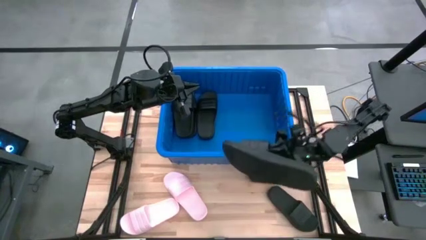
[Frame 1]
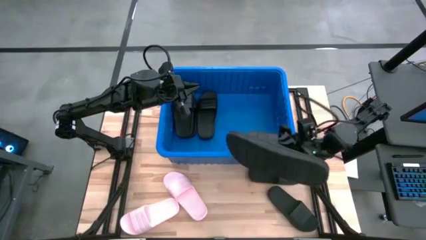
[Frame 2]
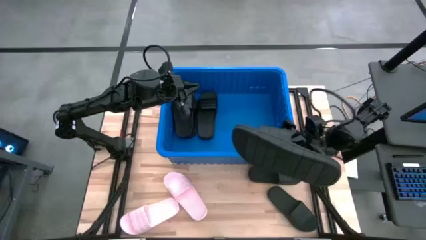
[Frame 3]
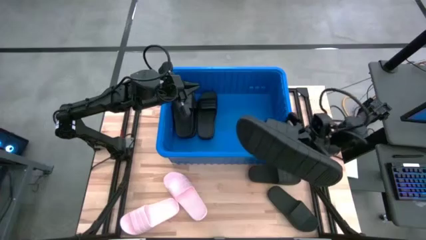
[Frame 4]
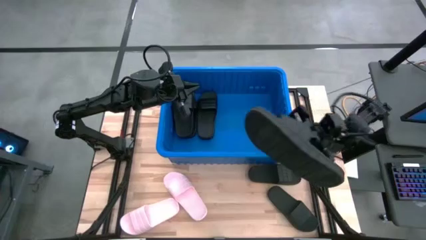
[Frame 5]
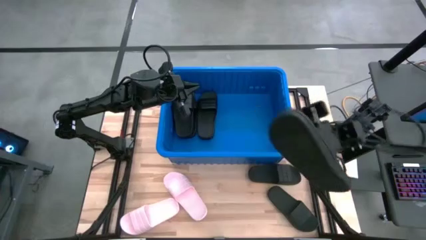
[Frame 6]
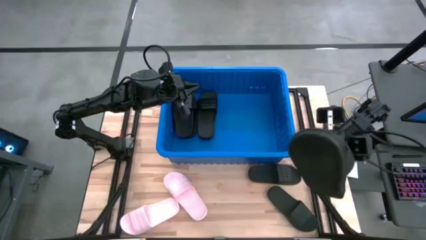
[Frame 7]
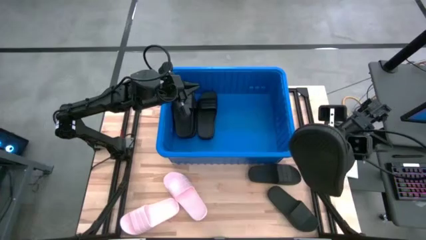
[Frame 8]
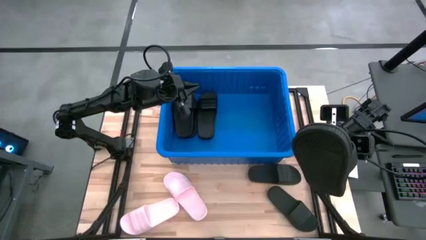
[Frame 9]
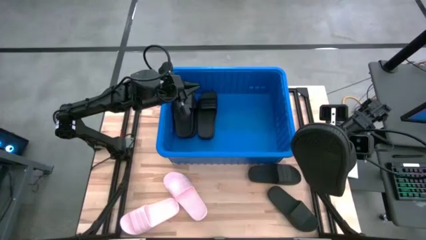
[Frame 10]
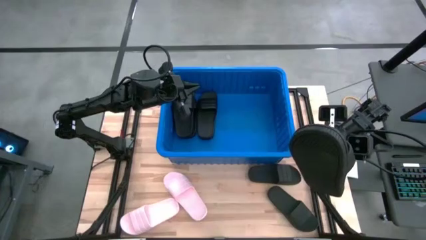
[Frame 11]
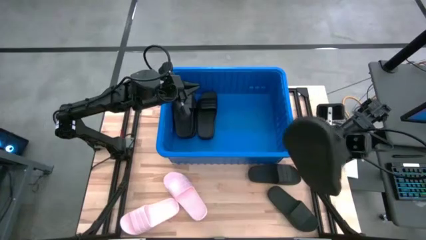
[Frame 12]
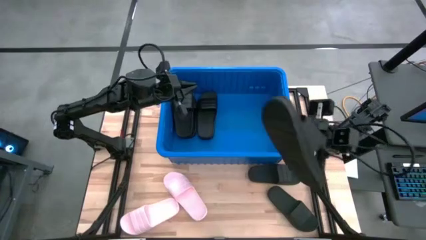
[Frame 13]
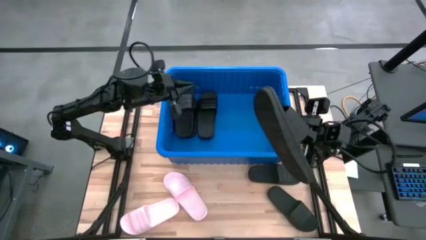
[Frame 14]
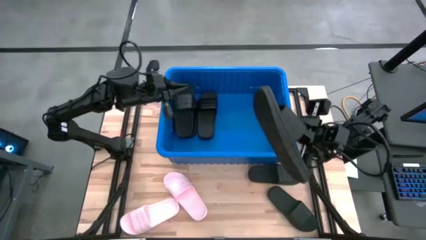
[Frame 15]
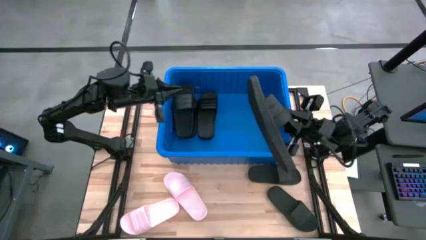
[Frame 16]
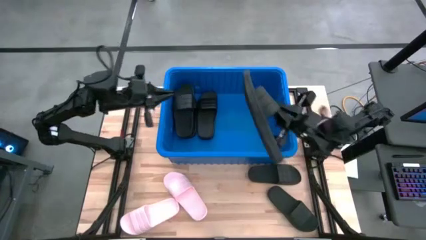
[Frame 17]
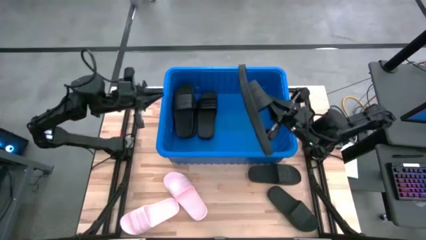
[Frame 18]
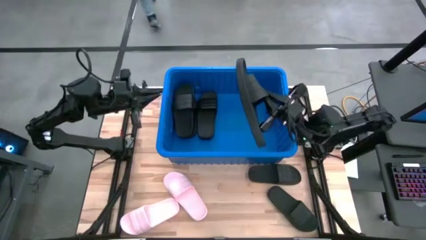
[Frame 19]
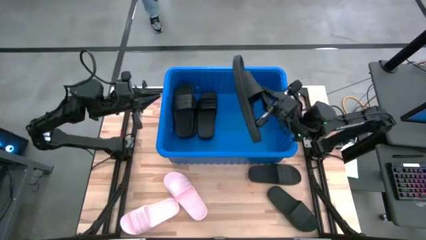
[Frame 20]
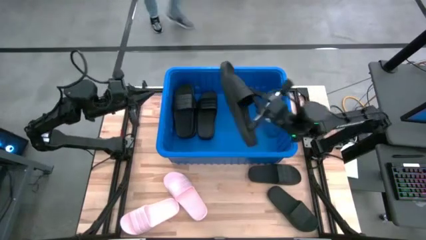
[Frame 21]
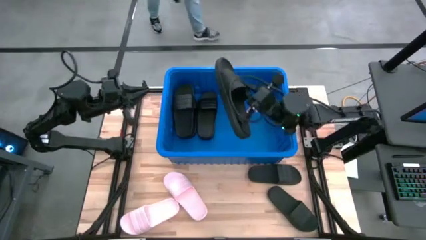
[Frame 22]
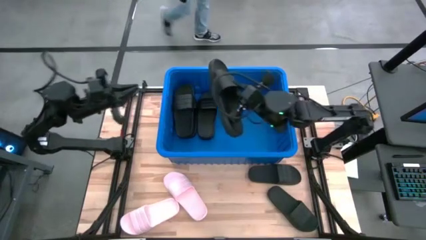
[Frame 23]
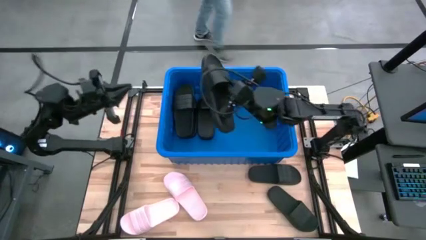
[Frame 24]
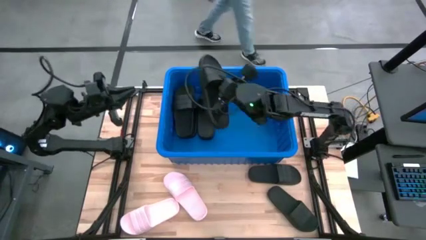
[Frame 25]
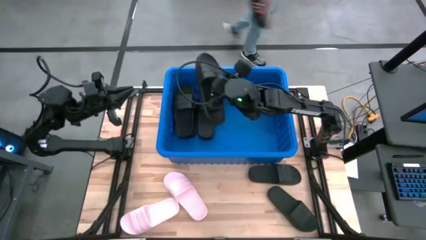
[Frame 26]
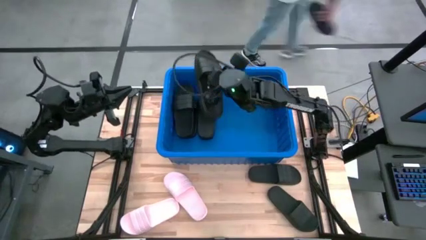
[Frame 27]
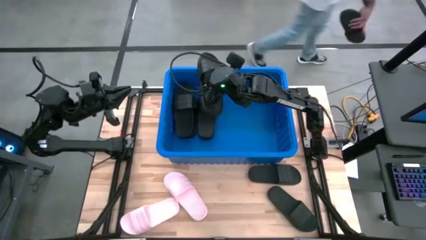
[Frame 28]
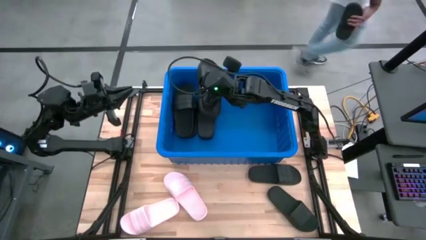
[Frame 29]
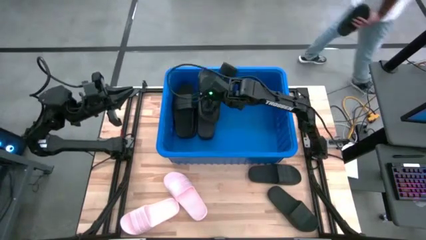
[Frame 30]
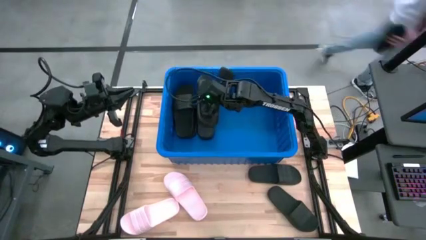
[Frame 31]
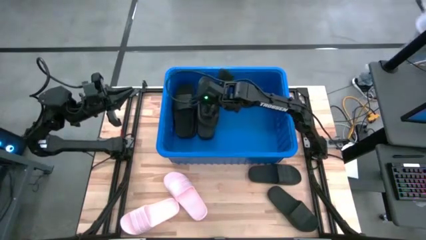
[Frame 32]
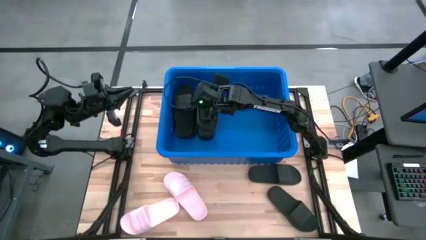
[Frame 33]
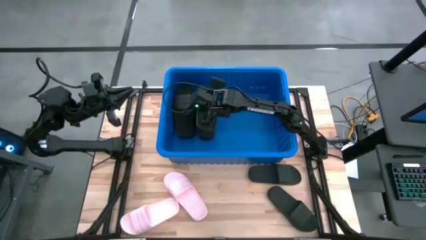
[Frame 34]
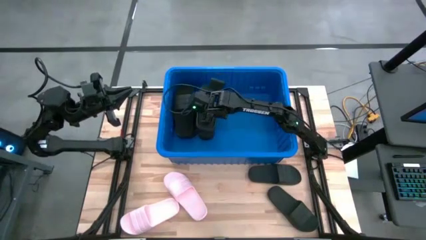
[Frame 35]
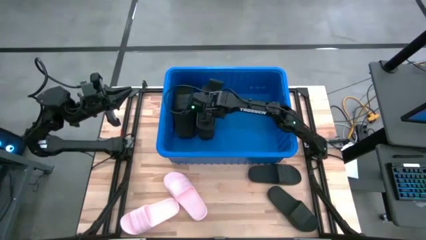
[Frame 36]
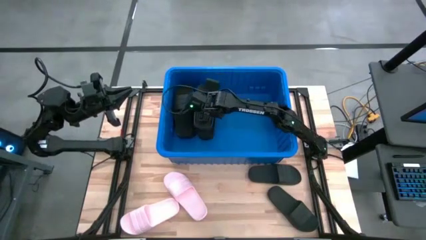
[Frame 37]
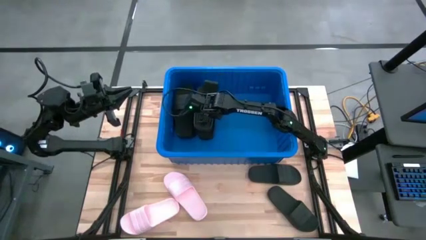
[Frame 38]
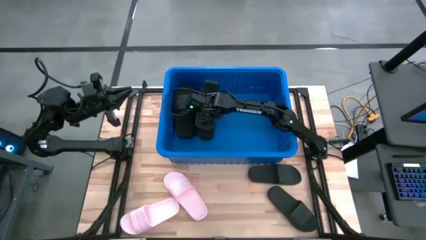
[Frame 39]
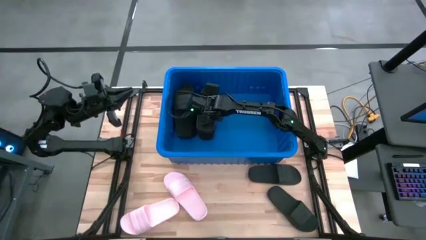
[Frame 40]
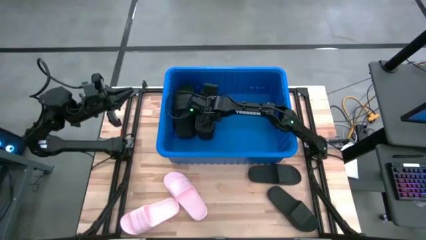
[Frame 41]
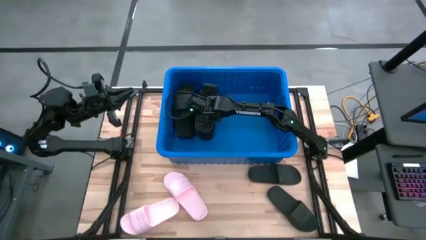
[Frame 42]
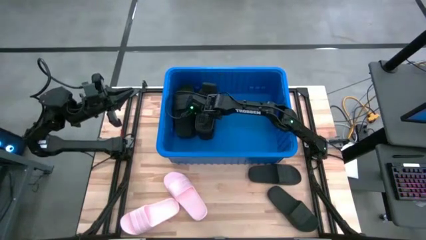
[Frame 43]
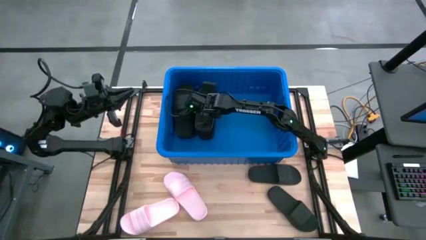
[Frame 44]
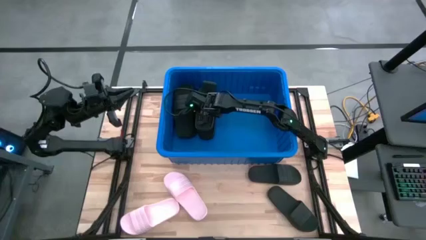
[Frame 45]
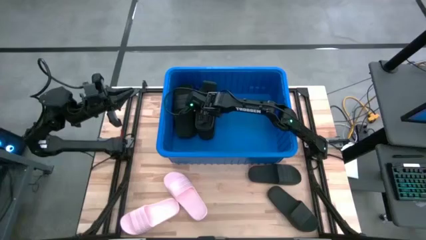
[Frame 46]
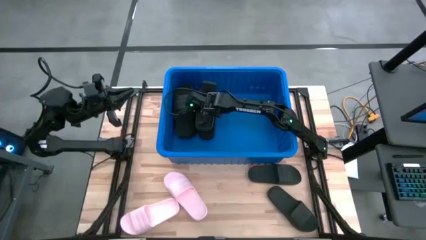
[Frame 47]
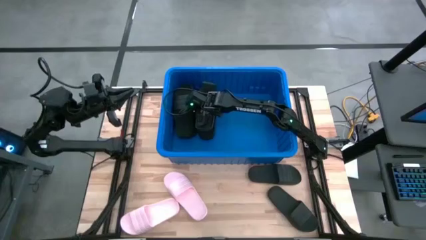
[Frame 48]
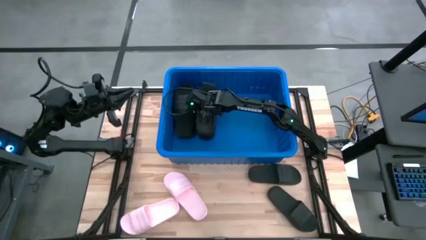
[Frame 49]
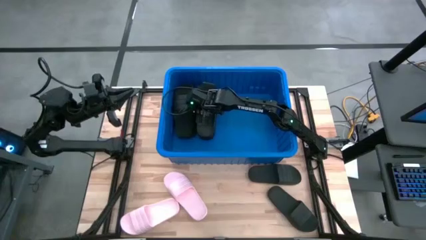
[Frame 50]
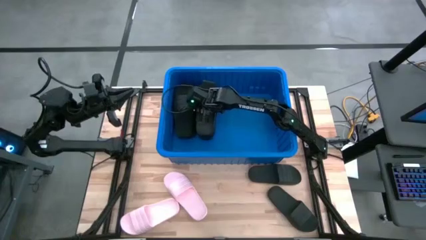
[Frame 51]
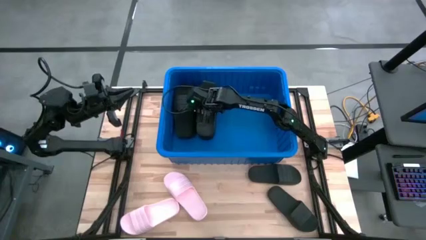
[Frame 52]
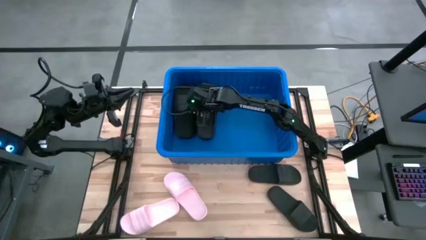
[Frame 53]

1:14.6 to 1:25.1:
Task: Pick and place slides into bin
Put the black slide into the blue bin
